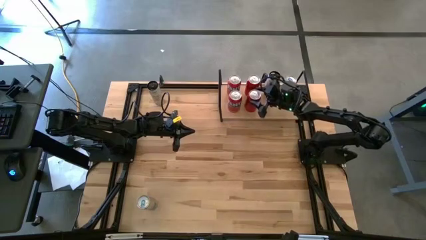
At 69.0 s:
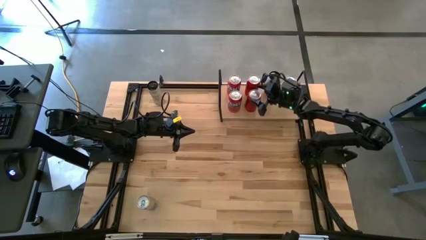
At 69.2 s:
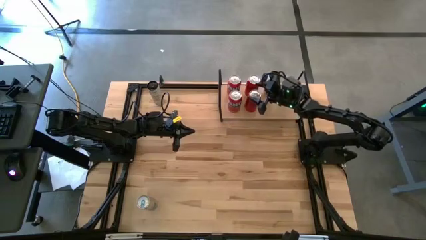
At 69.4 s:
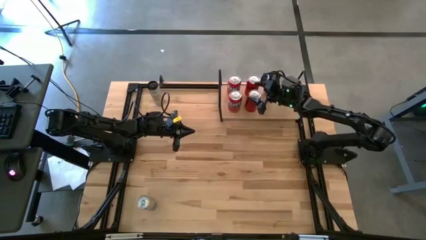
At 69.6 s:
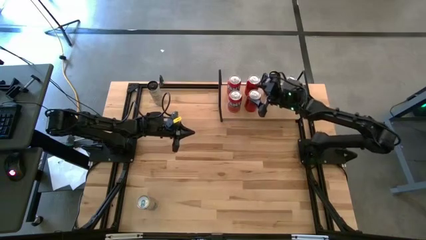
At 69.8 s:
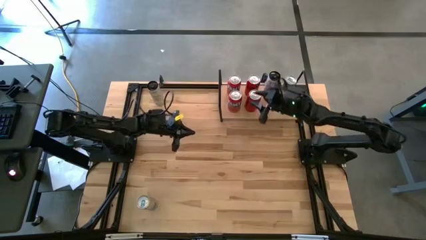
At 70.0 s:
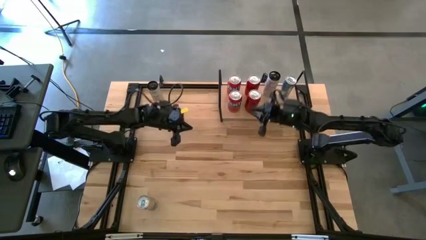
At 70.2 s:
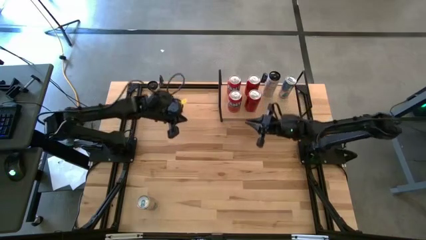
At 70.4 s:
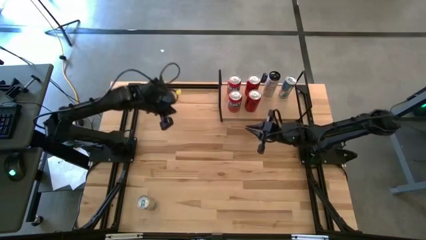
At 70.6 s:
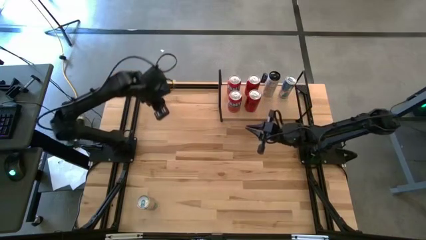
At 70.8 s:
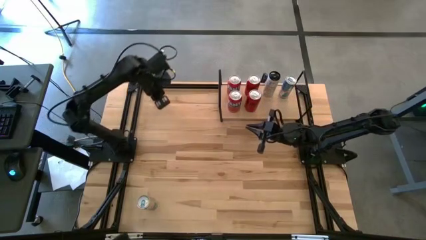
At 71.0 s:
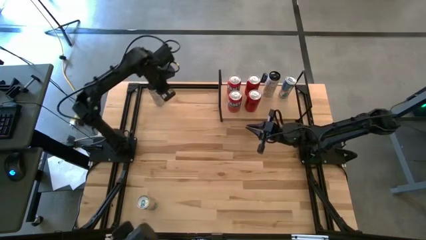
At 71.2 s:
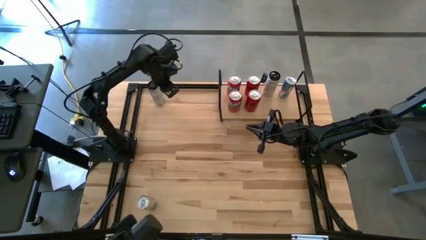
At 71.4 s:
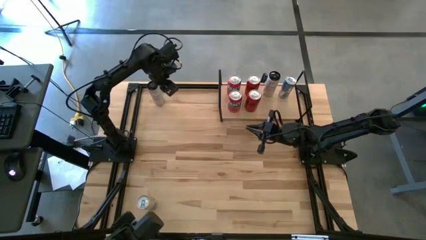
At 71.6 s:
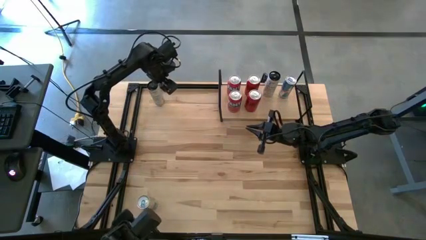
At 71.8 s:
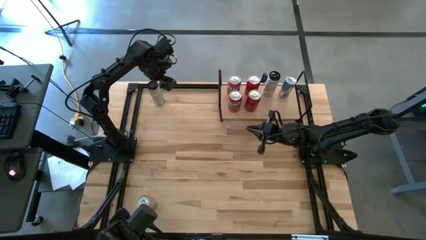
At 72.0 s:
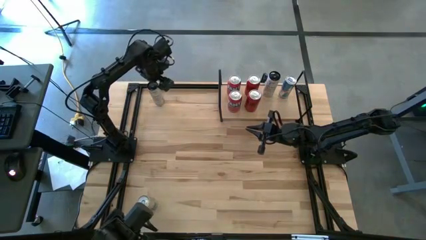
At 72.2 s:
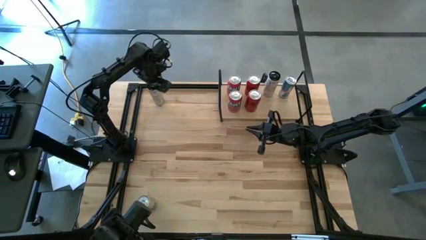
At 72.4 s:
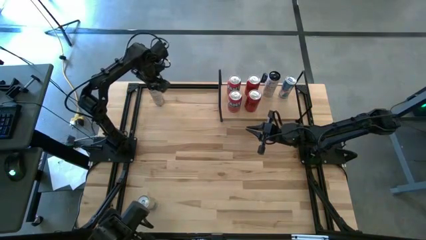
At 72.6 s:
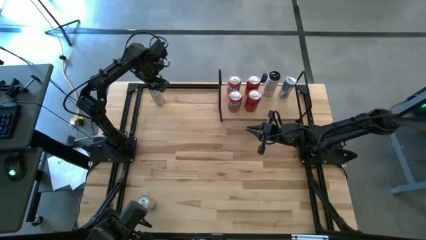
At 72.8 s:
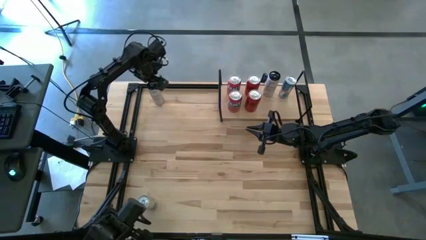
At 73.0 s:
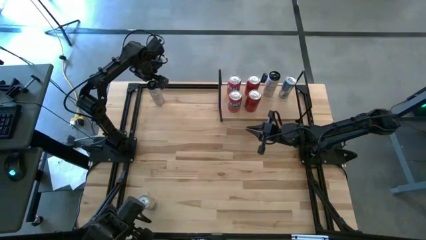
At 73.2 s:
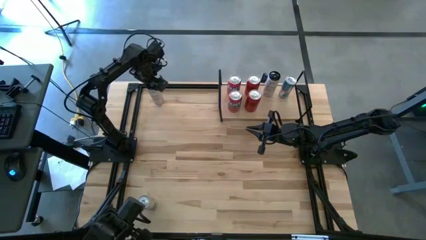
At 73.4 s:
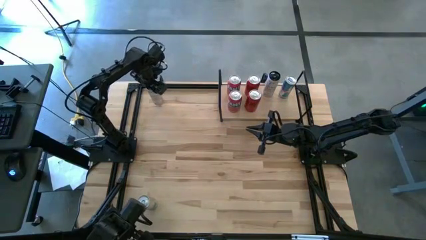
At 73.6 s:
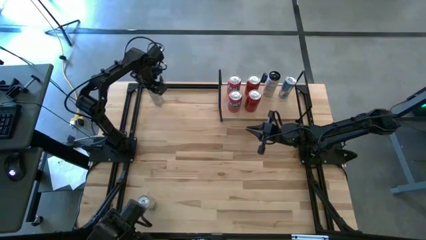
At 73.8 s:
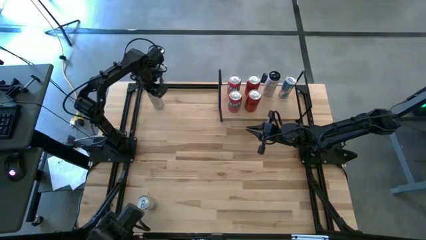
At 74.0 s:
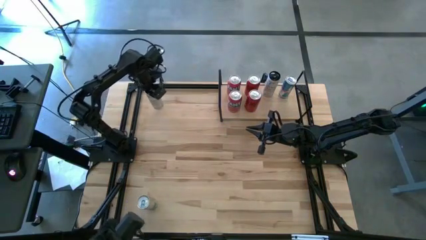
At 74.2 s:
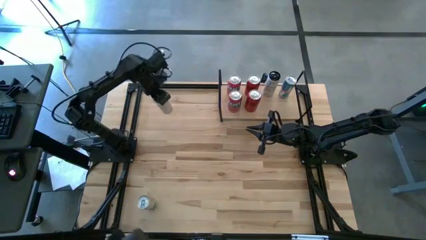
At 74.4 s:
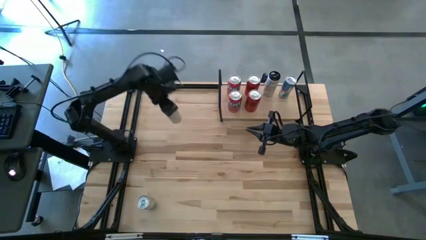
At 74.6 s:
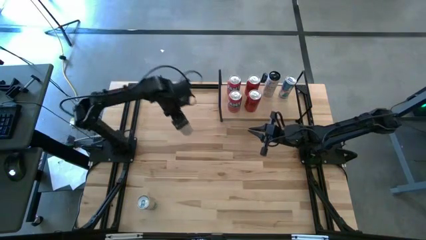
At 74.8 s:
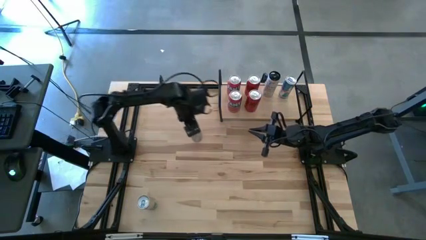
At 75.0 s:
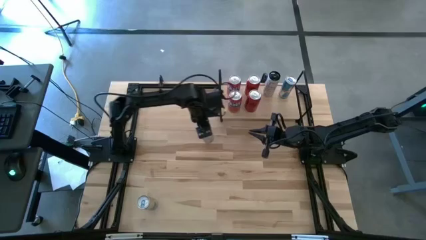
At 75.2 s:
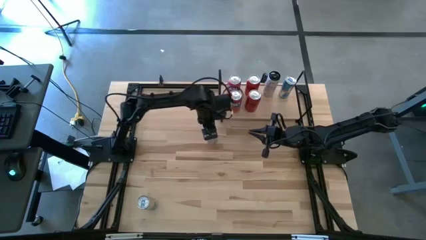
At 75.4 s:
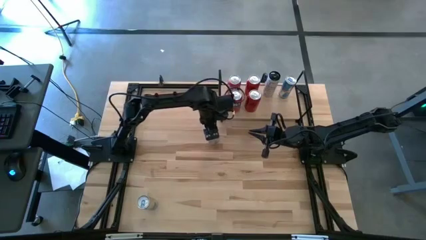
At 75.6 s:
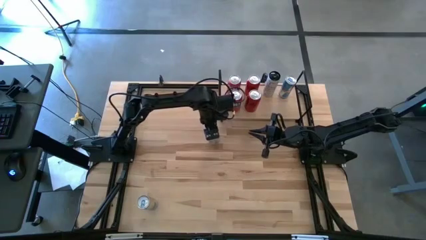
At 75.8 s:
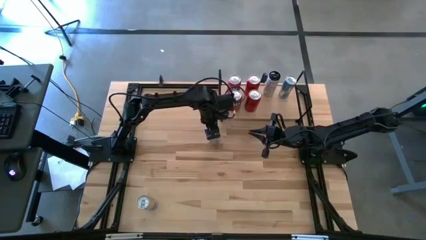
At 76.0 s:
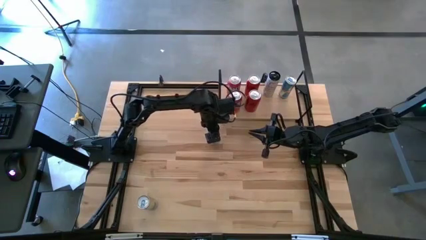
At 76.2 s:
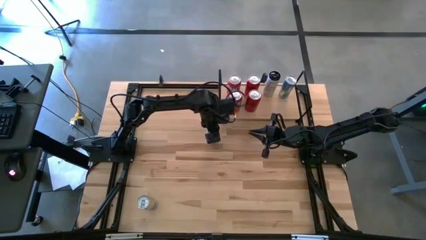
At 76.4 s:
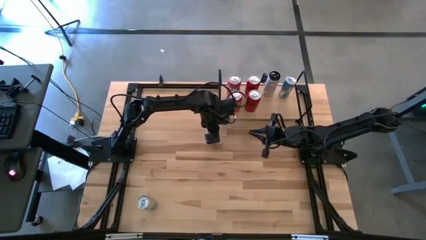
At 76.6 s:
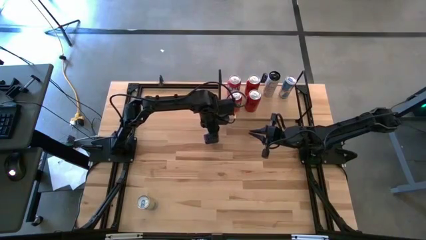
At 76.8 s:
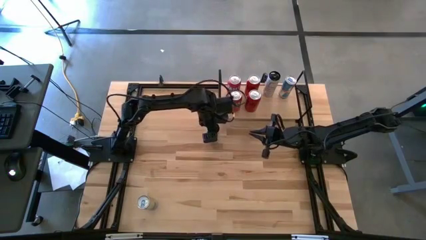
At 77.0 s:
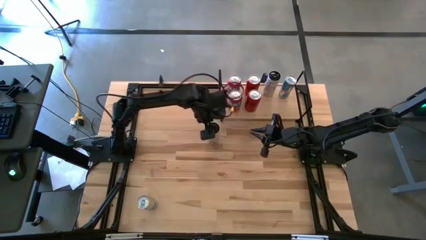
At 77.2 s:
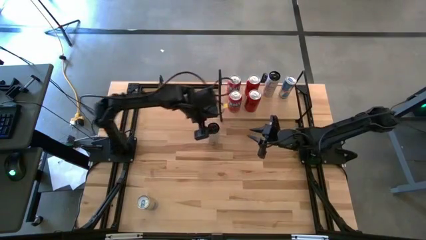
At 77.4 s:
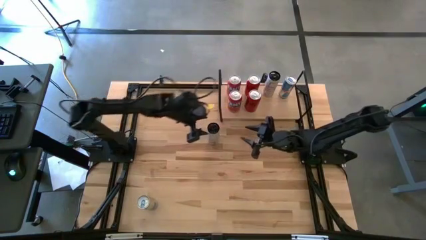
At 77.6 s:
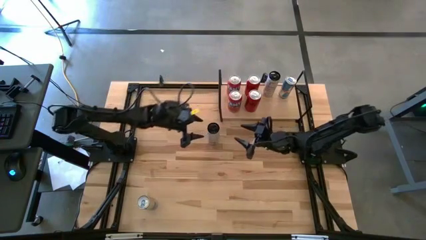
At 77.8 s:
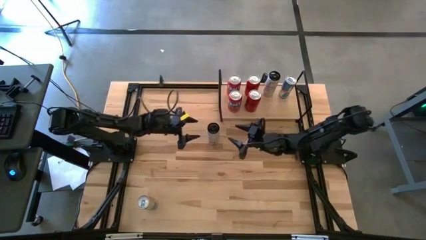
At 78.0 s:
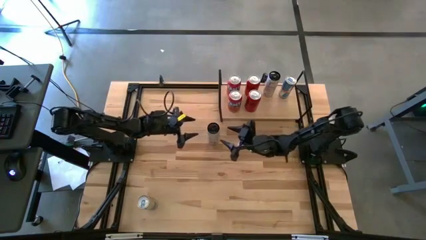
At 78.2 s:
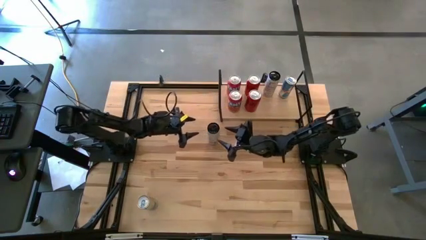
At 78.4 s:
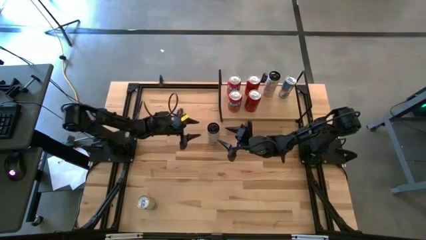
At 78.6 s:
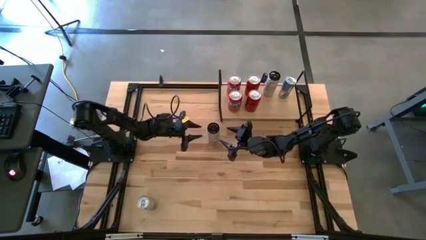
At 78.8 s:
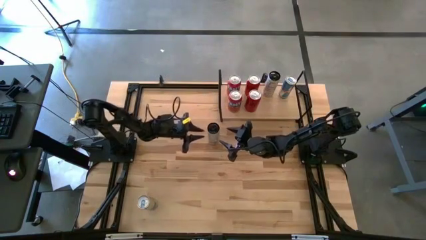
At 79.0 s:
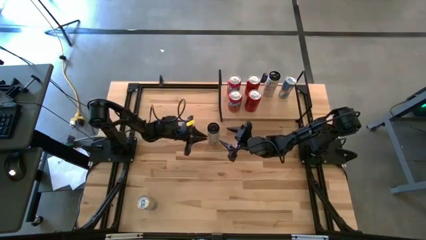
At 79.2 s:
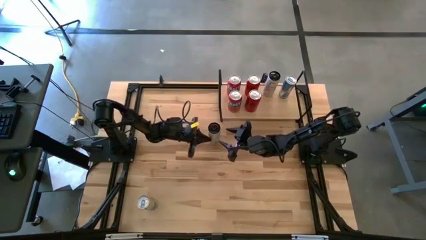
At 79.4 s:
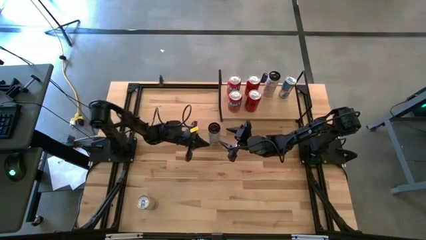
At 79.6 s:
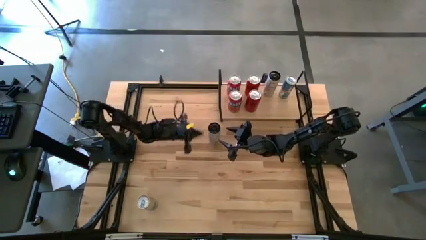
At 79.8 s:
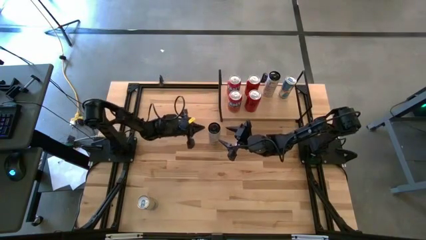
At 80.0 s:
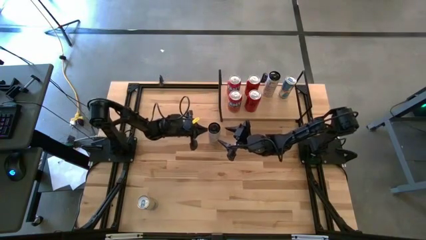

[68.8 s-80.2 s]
Task: Place canned beverage on shelf
Put the white yellow soda can on the shelf aligned with the white yellow soda can

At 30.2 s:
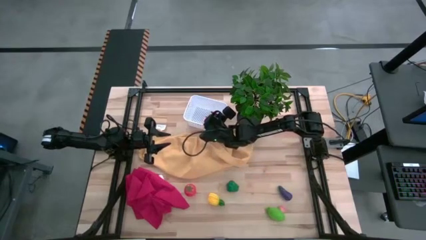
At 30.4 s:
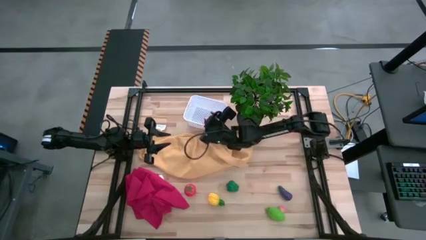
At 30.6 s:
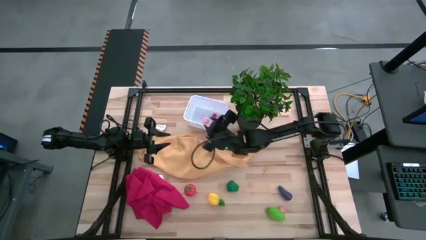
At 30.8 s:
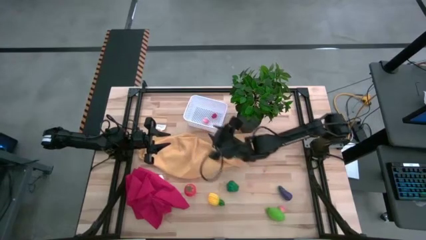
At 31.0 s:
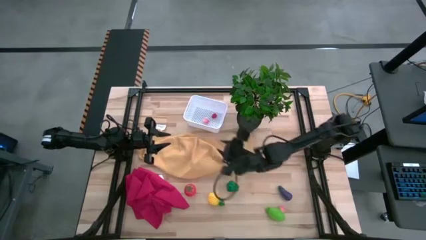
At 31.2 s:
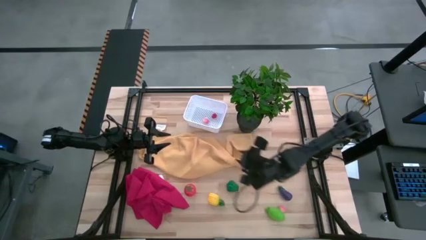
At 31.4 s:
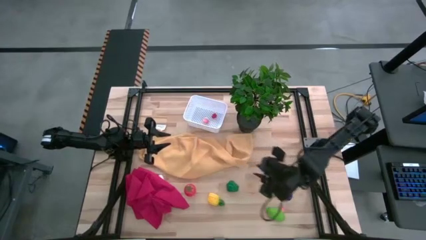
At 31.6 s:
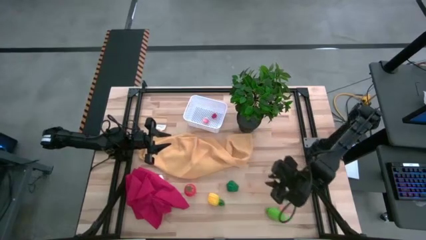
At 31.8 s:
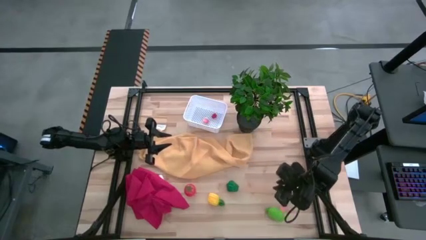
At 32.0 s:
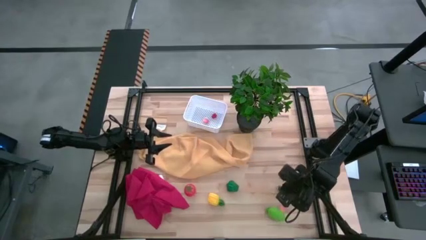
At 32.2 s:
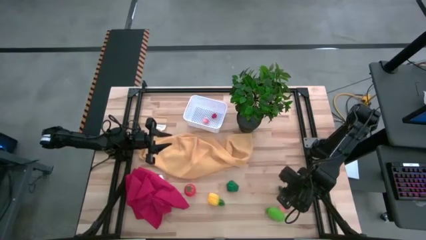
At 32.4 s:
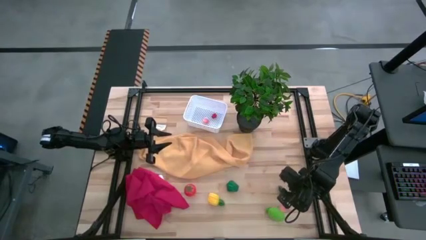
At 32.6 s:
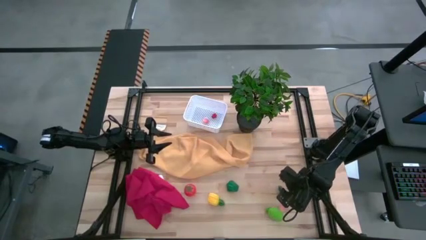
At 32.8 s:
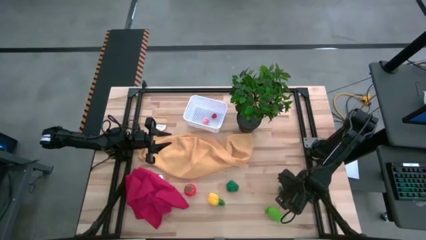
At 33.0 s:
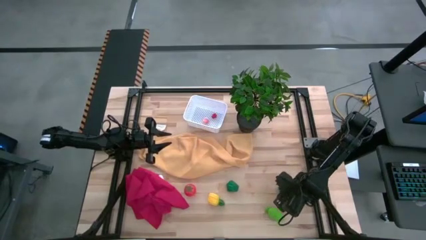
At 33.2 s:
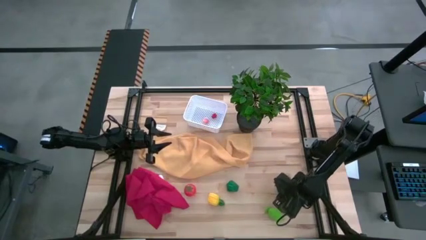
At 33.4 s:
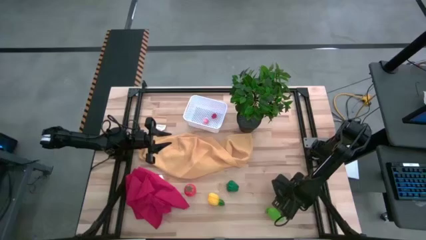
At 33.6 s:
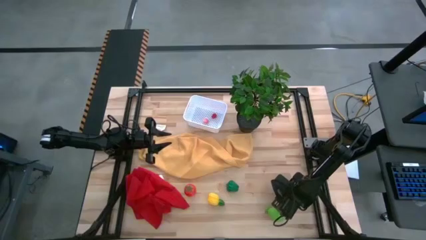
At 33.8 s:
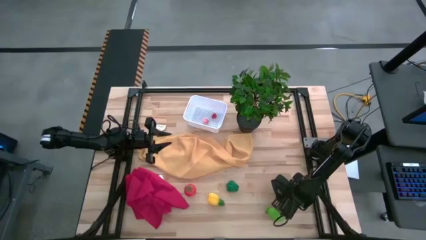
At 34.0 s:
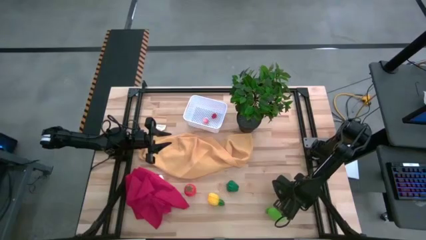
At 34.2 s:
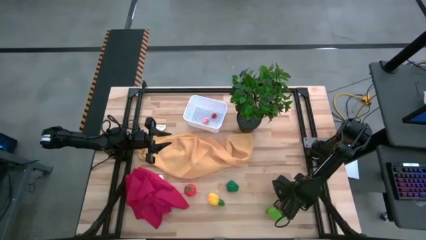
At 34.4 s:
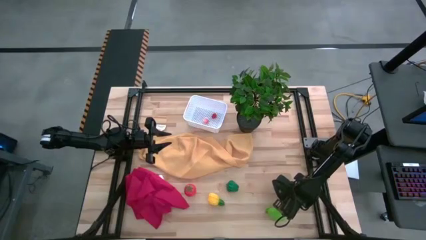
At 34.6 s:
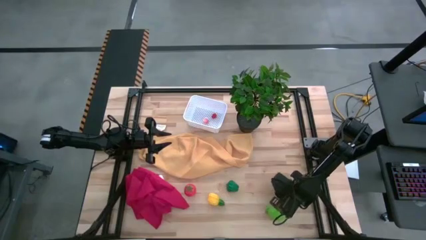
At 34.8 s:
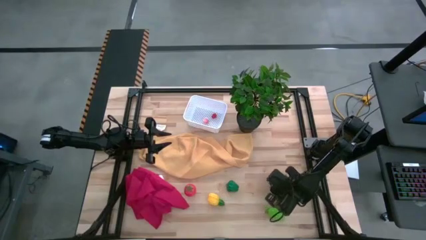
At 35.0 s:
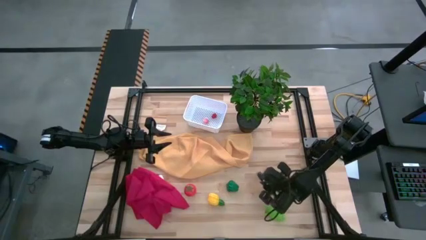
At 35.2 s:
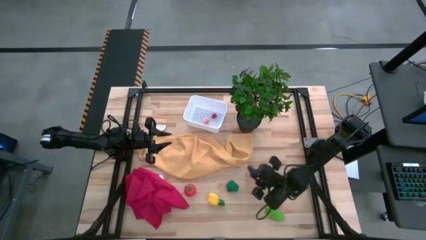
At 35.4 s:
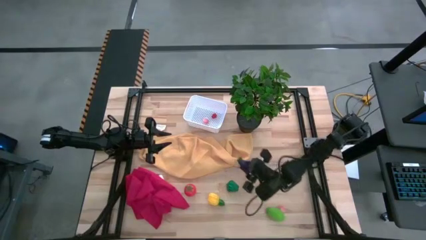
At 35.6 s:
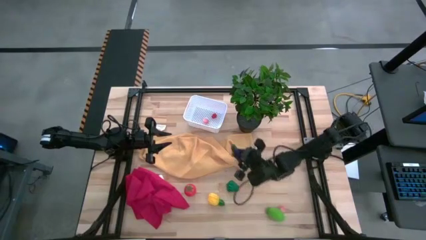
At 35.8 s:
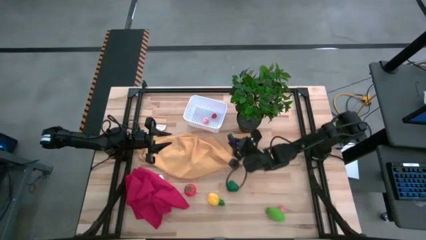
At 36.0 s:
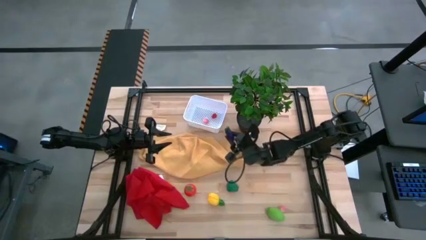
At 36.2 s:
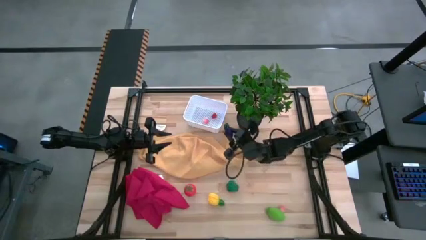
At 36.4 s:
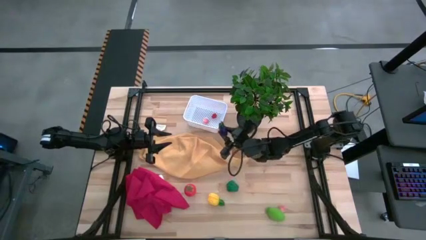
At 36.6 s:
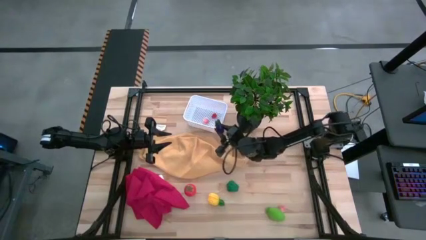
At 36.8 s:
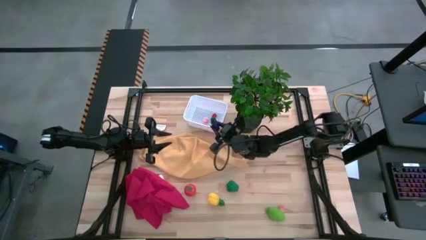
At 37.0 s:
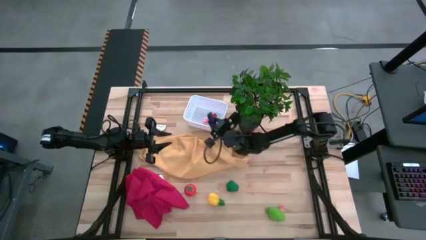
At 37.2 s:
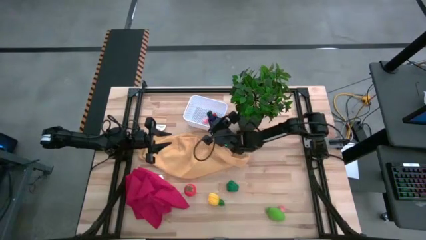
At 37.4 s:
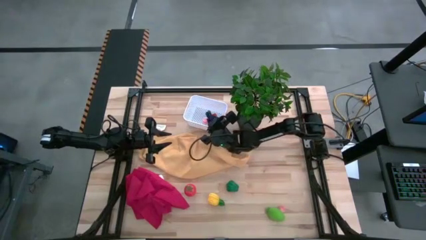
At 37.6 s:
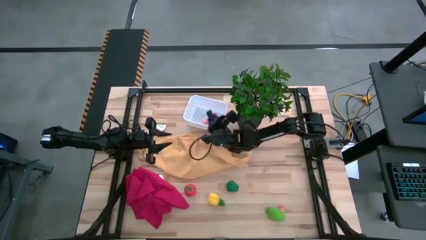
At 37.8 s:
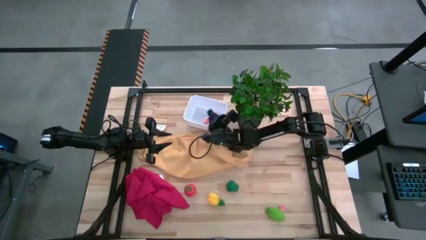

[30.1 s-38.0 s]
Task: Pick and placing Produce into tupperware
Put the purple eggplant into the white bin
